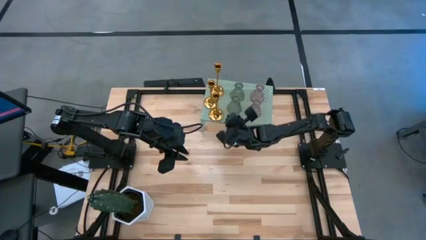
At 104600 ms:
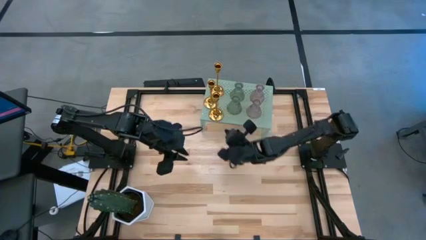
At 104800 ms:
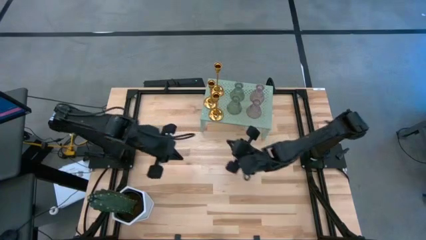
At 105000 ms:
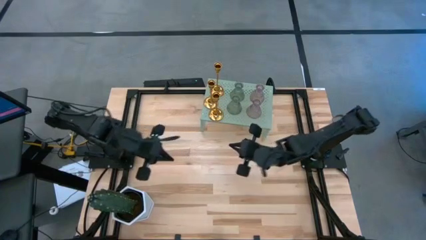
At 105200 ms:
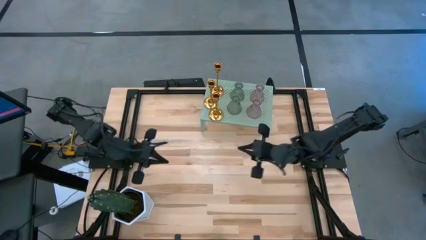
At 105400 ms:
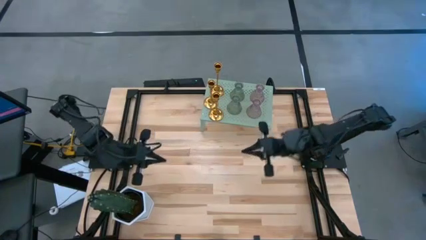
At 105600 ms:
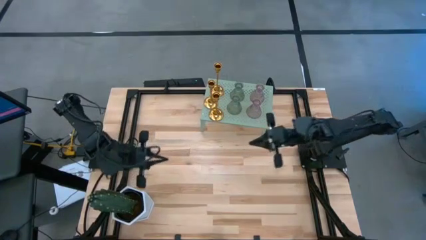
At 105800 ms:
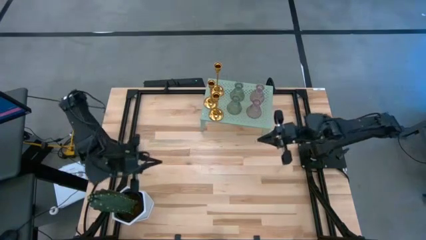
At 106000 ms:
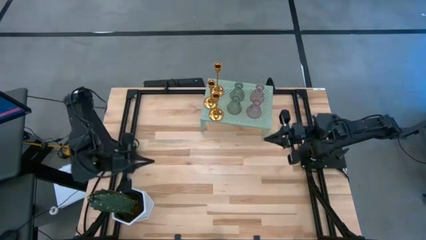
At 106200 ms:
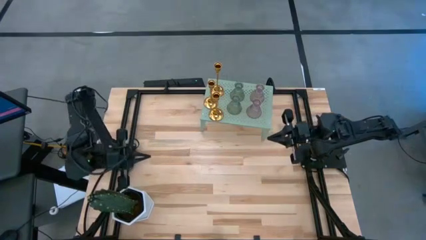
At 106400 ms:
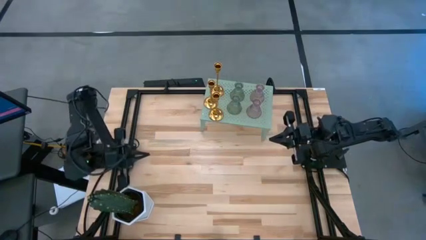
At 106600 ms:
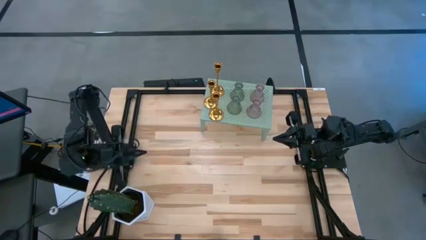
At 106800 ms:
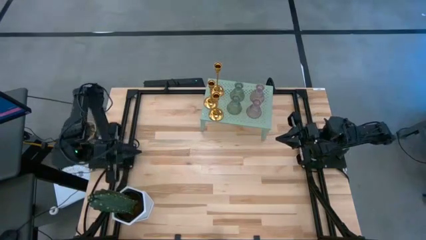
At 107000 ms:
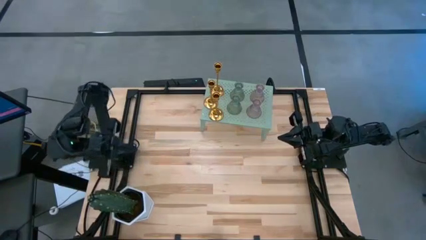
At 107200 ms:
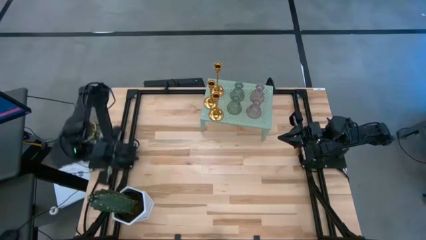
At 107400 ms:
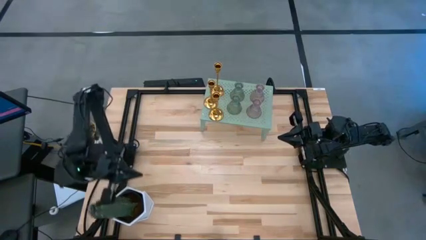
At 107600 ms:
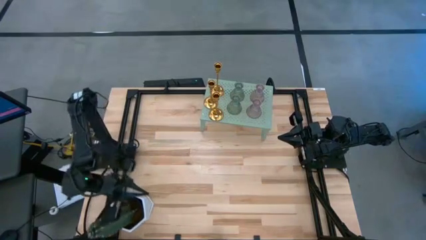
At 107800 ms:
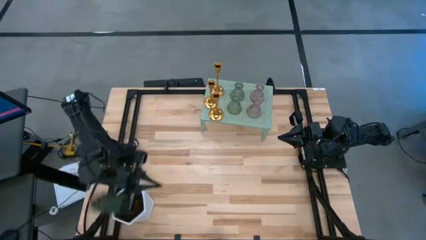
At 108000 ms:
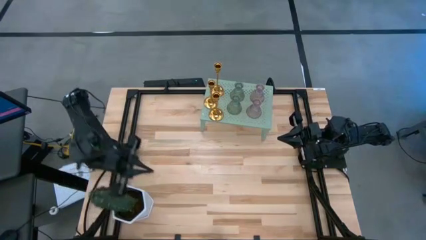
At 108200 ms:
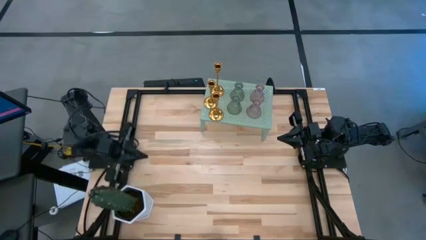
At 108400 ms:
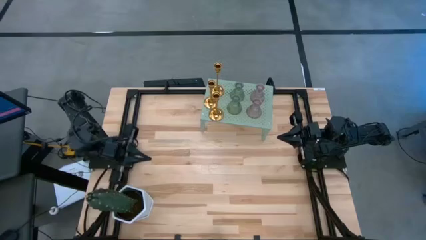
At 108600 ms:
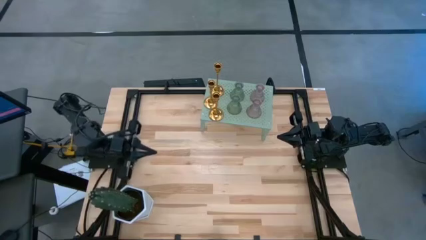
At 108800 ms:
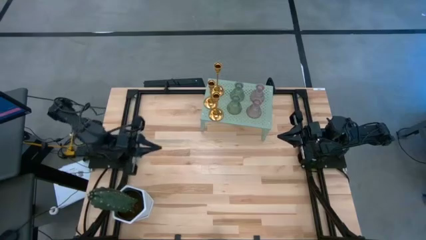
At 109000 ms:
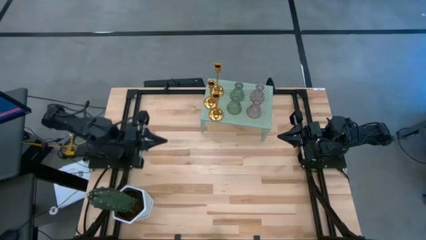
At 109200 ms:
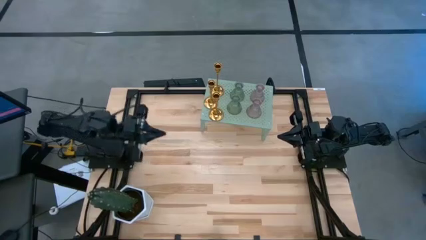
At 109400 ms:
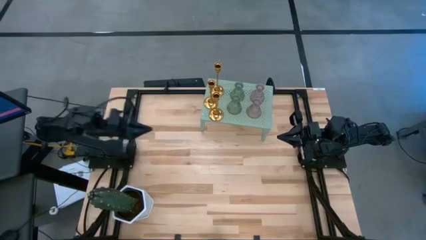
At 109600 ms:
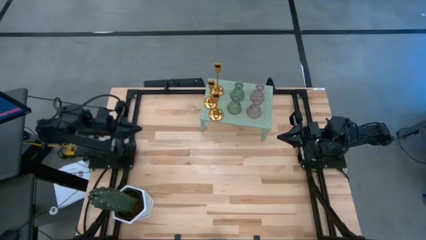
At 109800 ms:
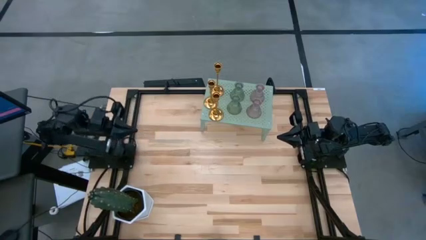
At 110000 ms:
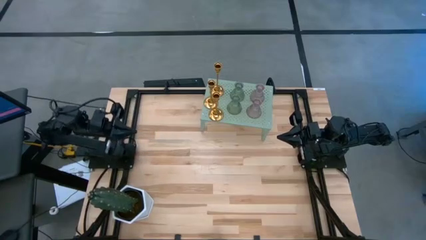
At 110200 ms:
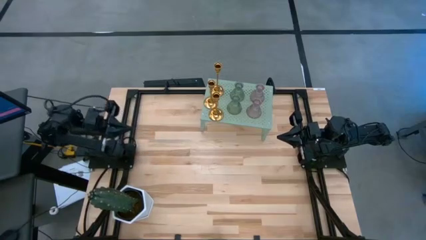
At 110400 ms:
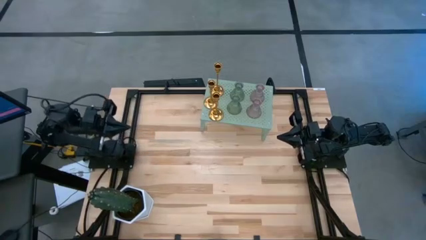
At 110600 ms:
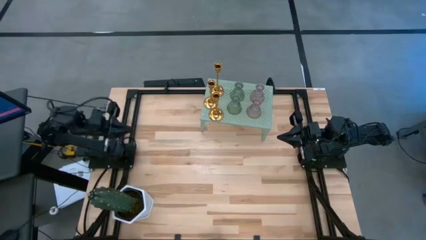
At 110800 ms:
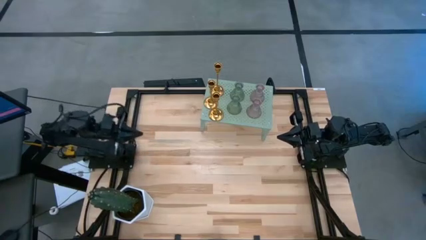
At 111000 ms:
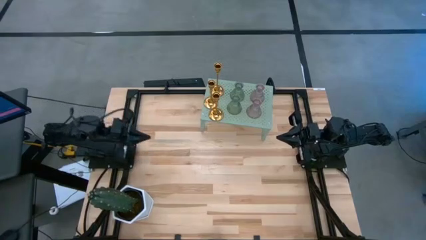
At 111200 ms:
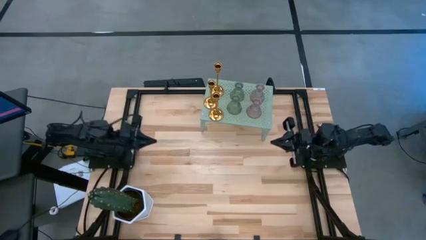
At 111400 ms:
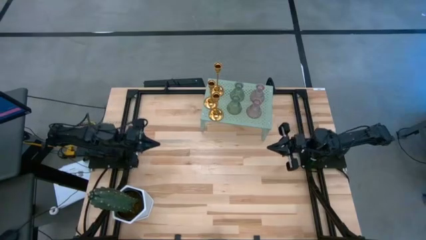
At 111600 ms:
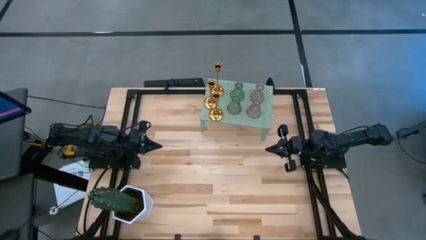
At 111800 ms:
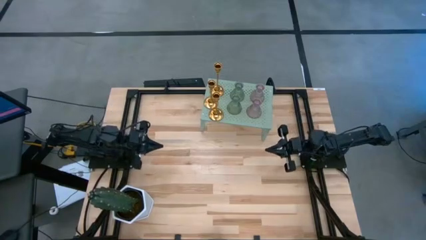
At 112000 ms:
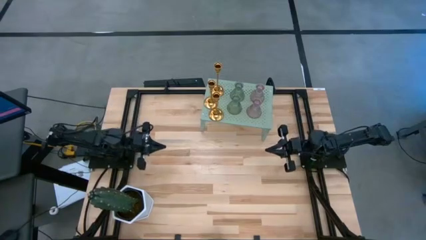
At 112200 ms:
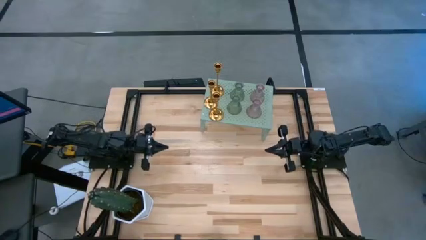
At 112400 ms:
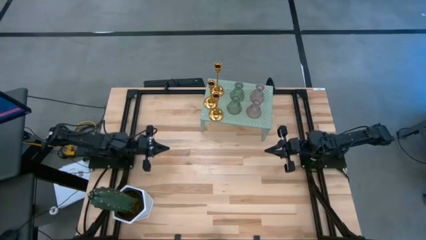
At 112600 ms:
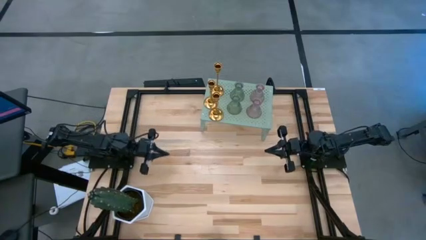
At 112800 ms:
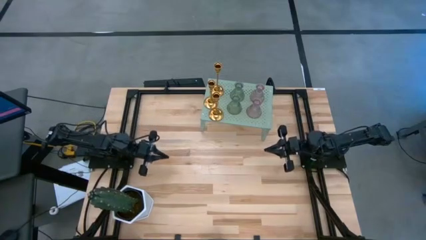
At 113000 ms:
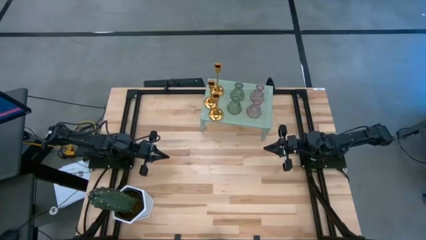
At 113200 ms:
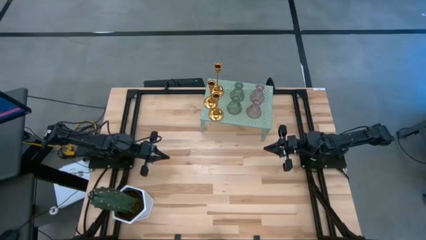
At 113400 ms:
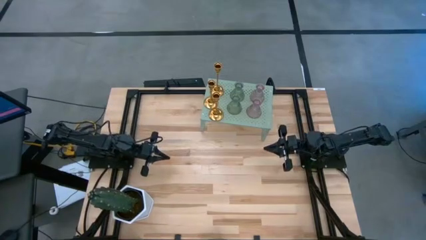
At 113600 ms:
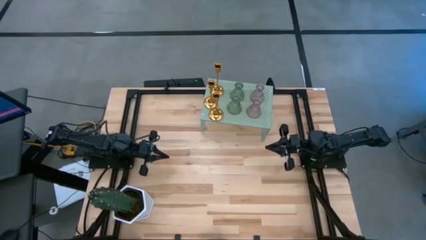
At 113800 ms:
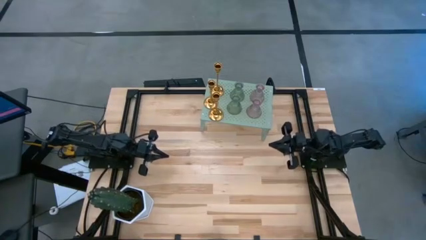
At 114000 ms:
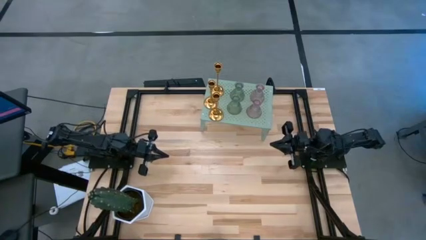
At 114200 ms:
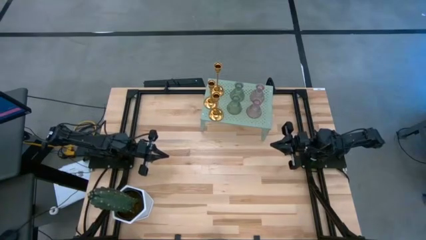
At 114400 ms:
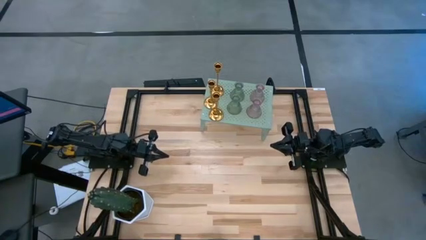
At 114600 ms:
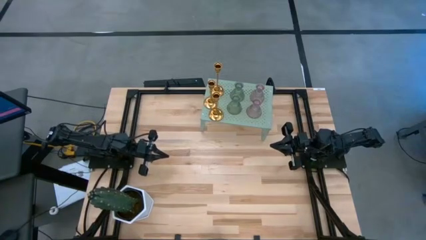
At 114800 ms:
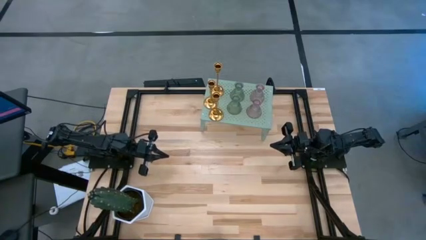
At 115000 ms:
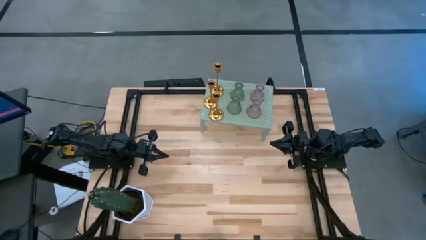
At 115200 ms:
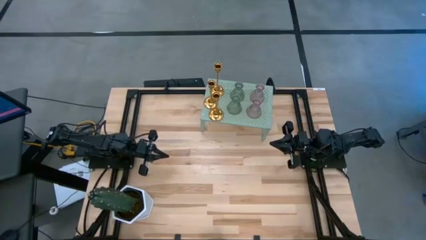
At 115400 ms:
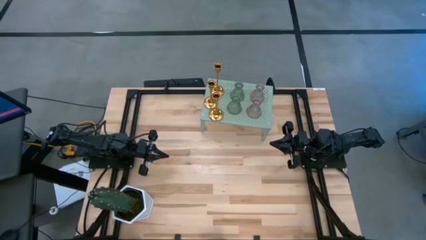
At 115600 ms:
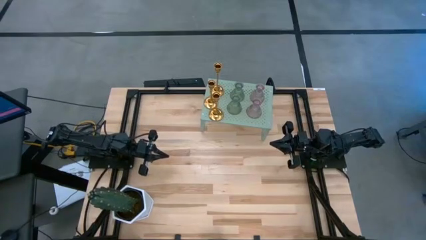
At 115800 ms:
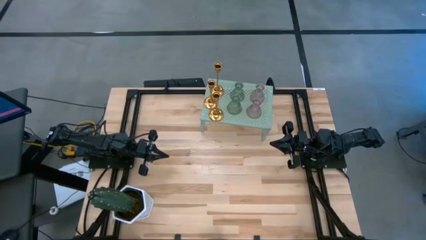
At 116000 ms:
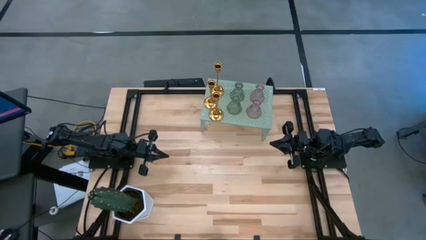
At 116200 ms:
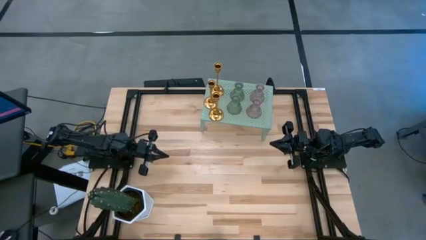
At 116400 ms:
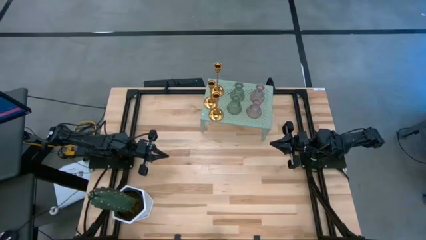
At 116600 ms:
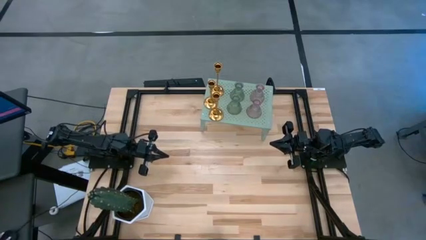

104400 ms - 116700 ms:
Task: Pick & Place candle stick holders
Return to Home Position
